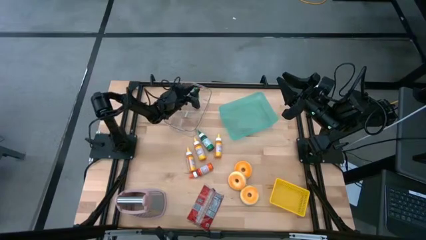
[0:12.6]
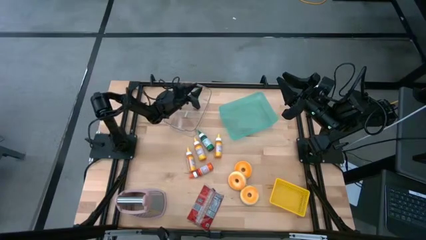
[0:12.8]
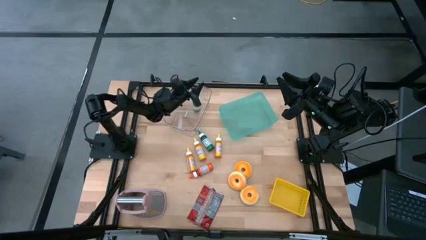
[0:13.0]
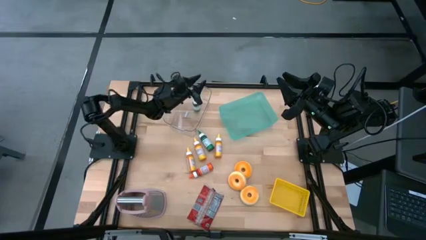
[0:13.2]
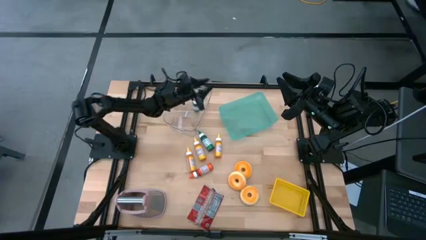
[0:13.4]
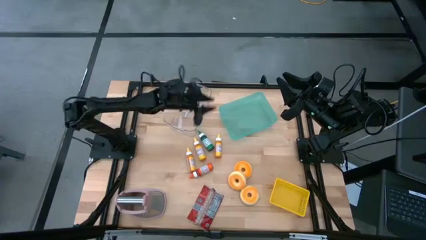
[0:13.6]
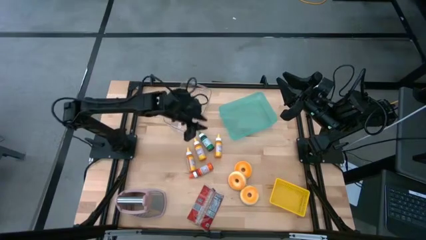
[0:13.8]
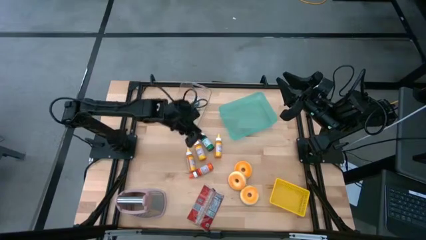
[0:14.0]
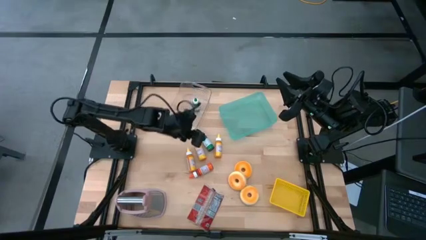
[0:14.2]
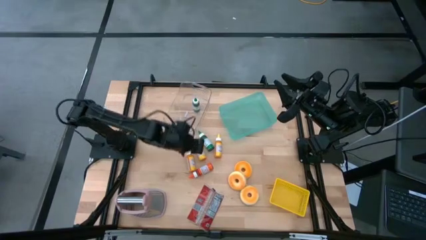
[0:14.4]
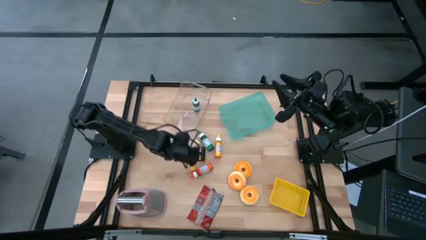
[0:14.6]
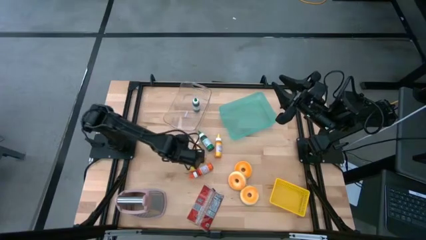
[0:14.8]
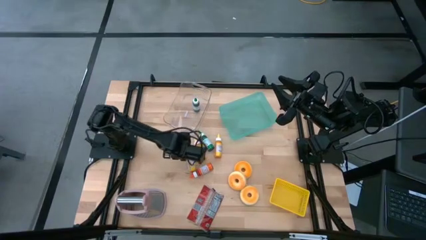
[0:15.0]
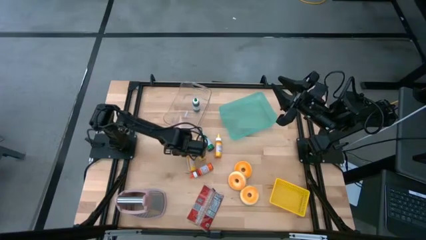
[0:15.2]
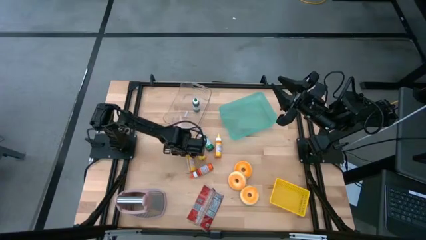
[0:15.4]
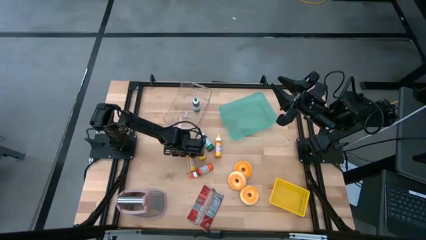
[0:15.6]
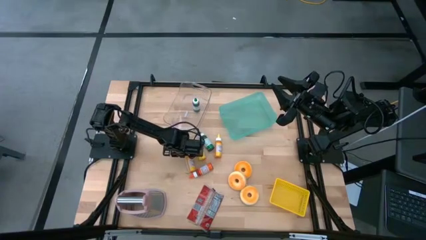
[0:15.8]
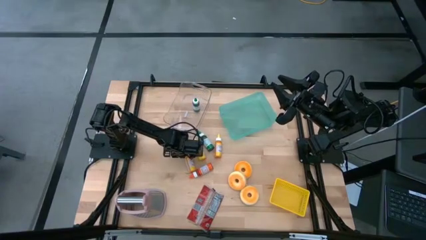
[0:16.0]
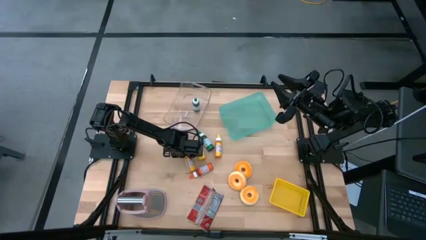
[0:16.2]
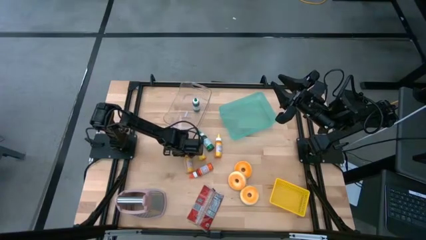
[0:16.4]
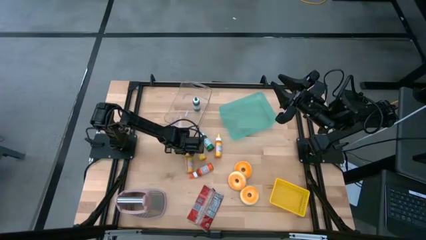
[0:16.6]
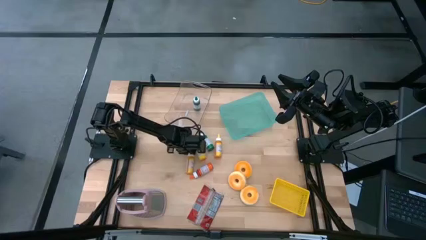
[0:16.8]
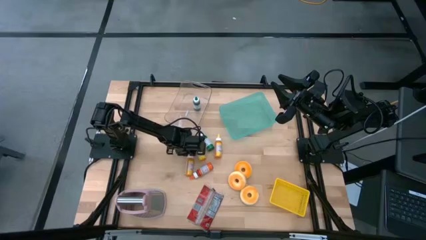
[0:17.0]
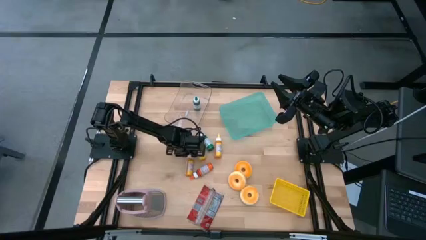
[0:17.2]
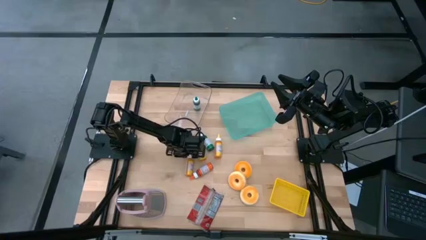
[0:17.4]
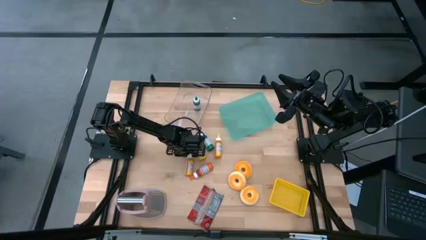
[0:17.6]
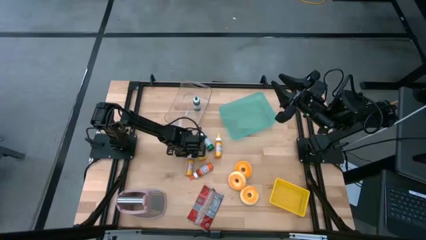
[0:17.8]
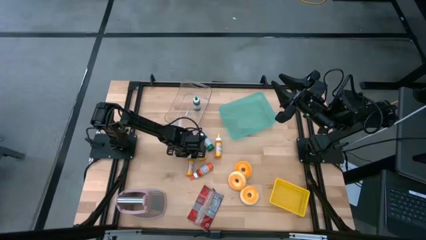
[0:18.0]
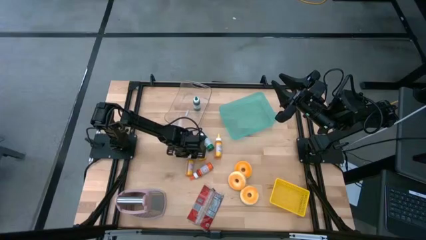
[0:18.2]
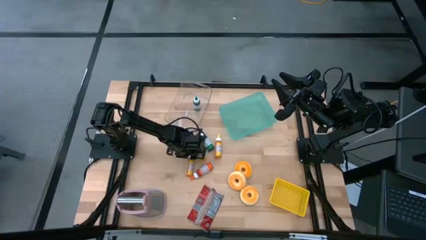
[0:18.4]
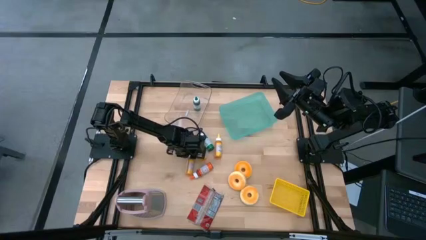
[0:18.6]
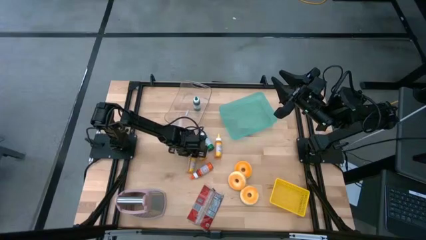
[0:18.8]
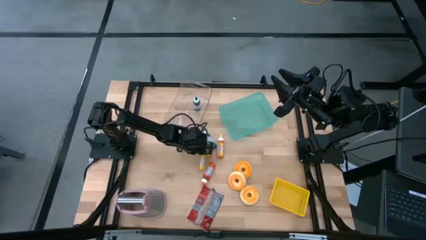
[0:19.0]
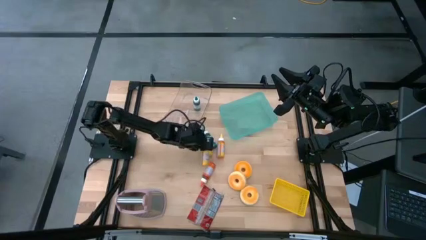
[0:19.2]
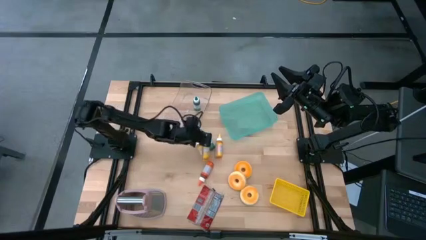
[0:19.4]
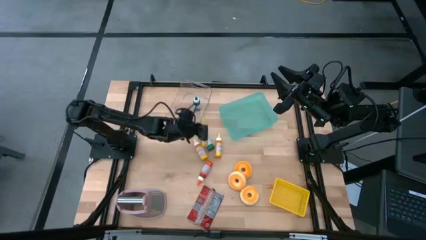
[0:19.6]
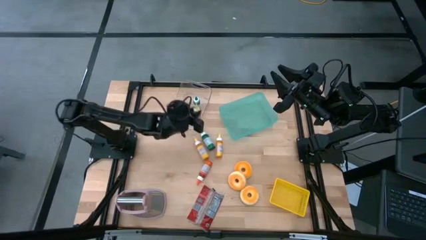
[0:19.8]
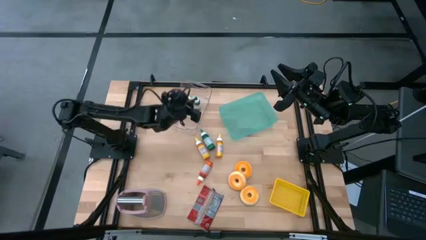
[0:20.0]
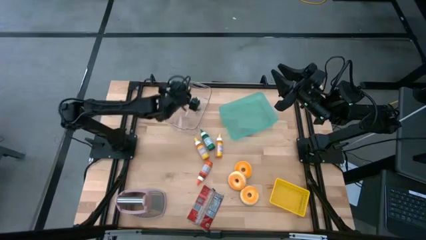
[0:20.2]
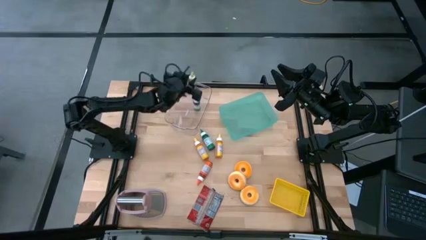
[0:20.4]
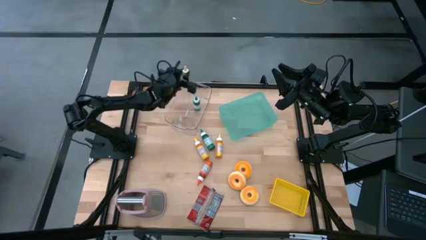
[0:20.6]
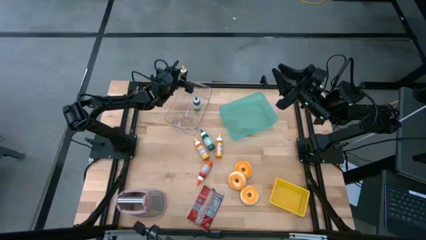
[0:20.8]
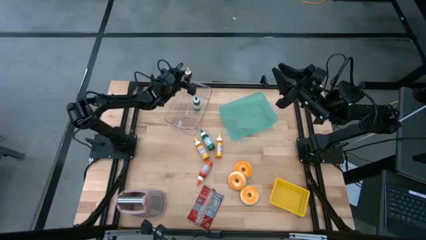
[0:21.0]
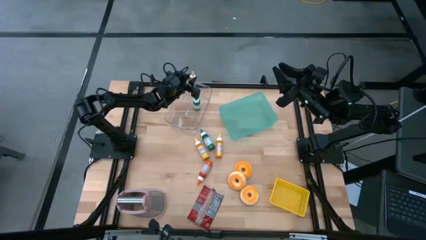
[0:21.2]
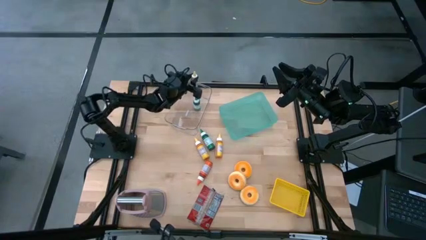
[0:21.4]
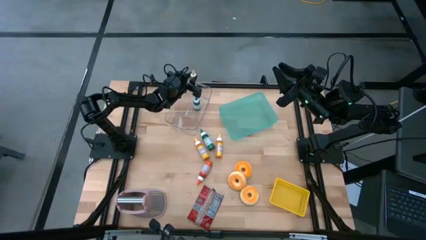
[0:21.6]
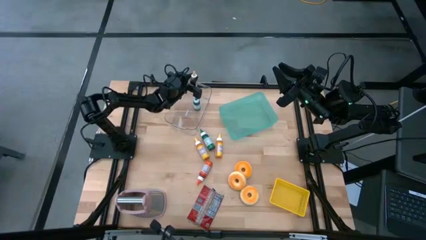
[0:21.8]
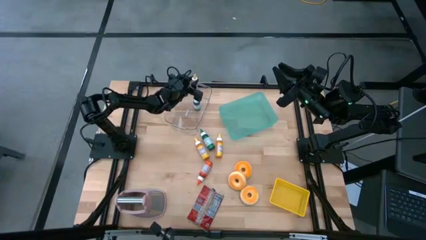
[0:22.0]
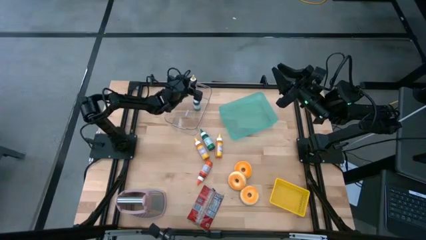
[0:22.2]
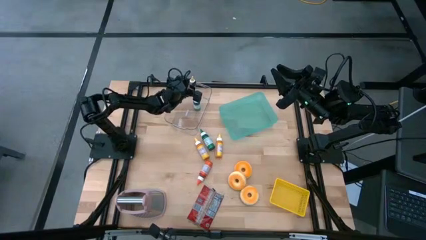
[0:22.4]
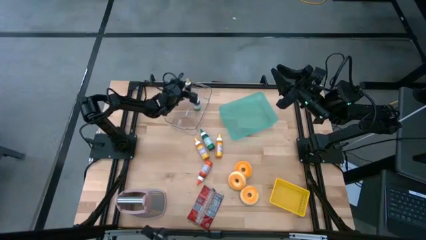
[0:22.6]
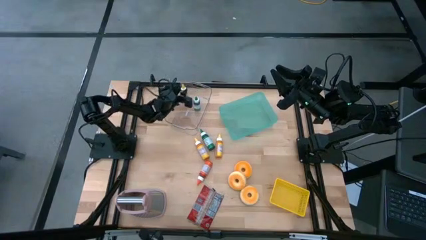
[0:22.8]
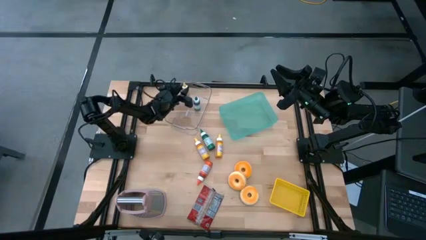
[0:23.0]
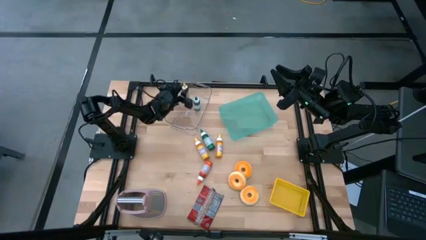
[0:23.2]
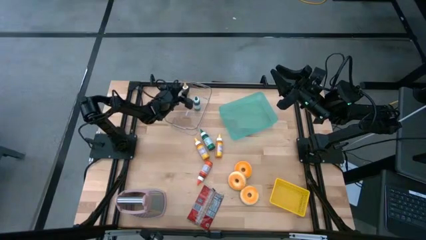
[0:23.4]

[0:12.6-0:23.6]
Put the left yellow food coloring bottle into the transparent bin
